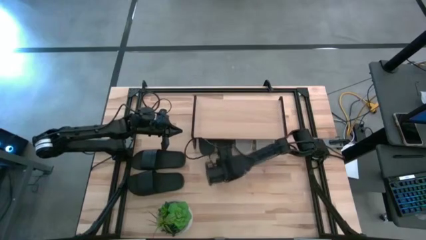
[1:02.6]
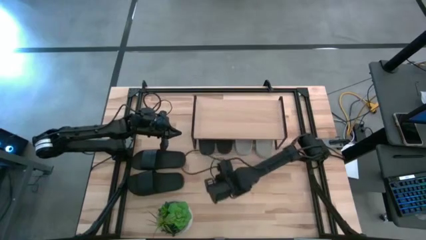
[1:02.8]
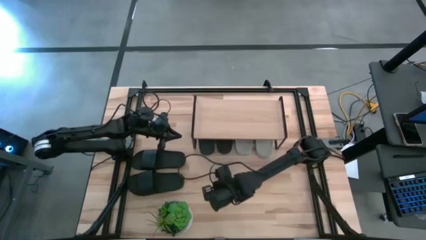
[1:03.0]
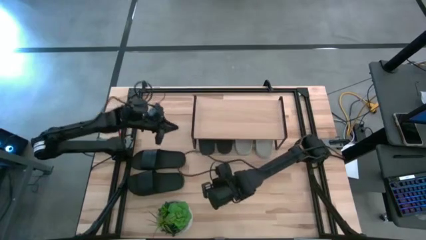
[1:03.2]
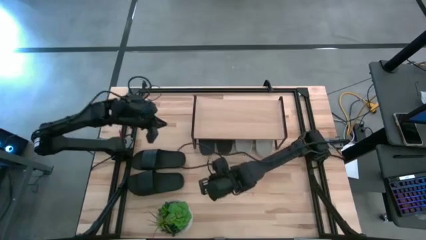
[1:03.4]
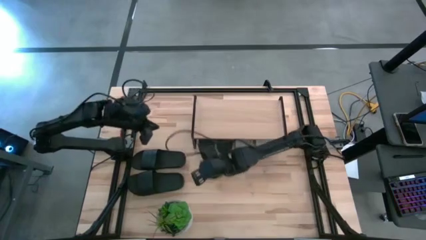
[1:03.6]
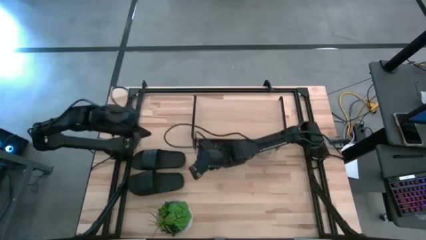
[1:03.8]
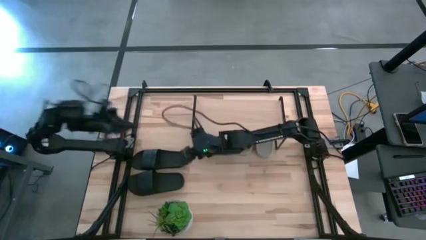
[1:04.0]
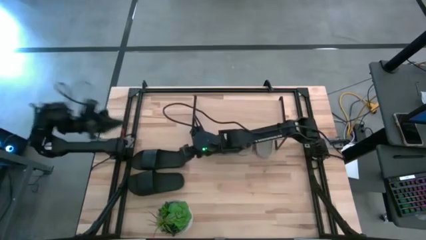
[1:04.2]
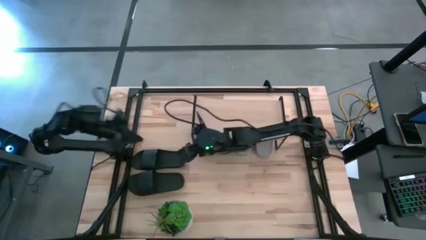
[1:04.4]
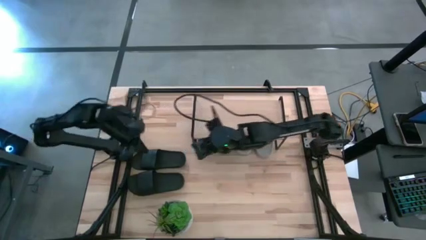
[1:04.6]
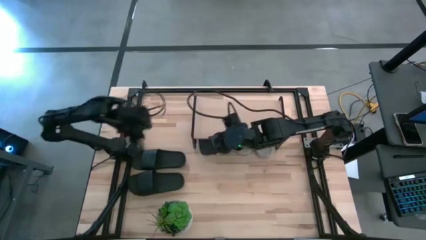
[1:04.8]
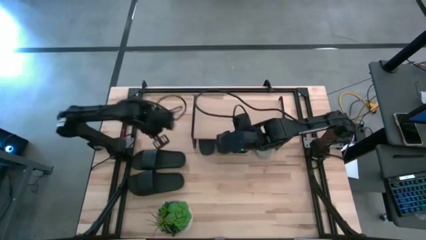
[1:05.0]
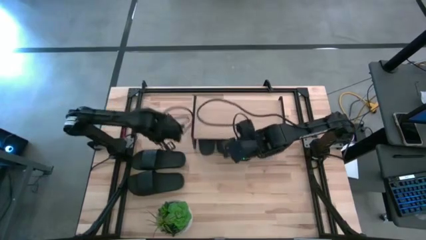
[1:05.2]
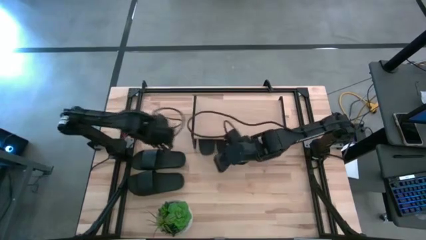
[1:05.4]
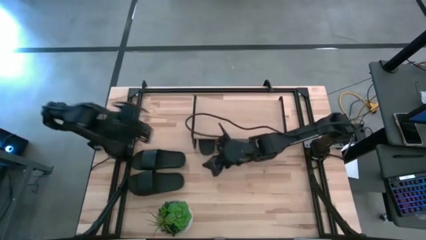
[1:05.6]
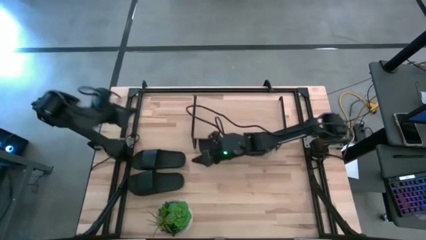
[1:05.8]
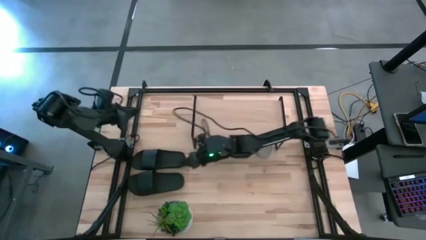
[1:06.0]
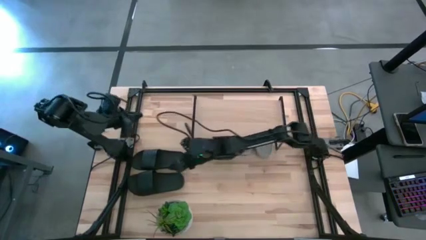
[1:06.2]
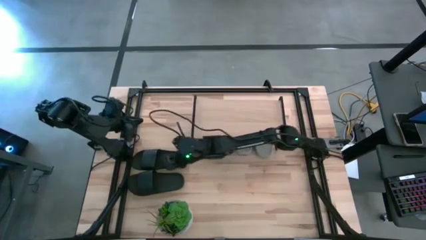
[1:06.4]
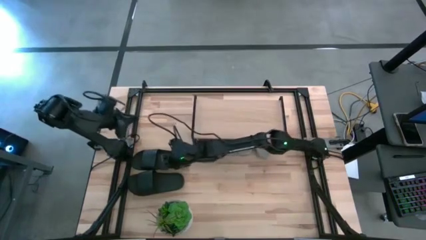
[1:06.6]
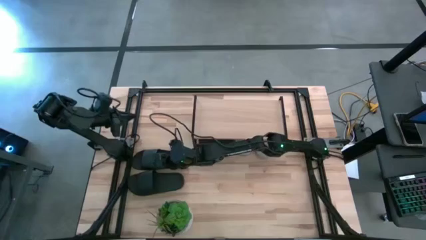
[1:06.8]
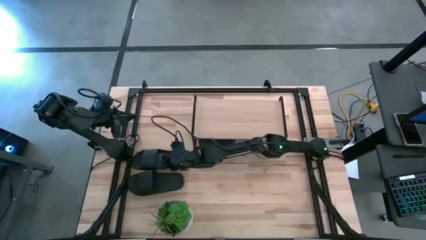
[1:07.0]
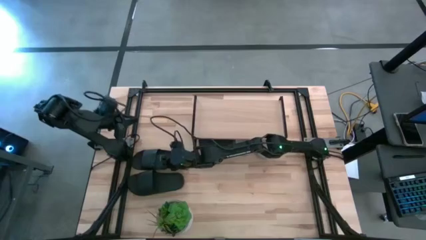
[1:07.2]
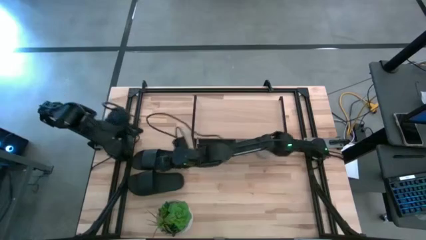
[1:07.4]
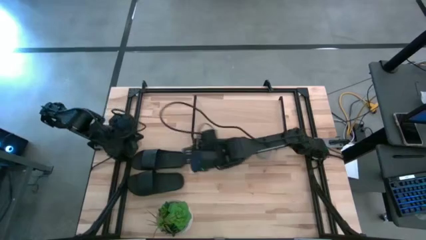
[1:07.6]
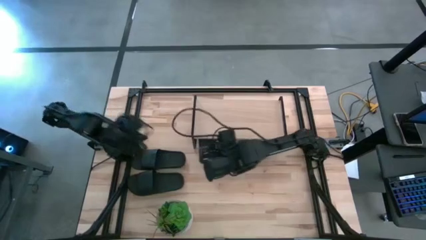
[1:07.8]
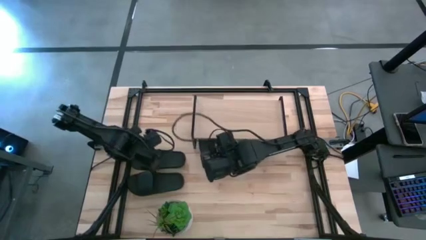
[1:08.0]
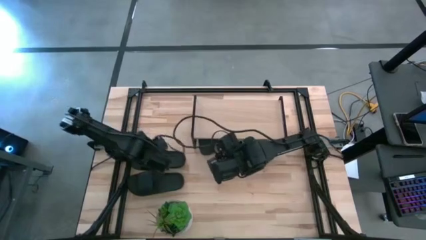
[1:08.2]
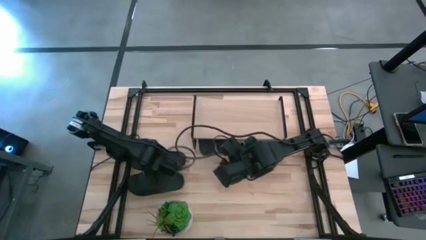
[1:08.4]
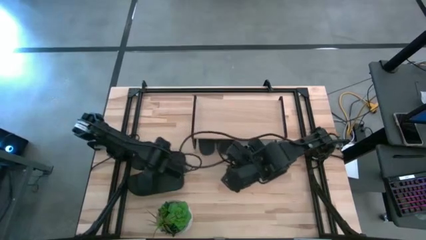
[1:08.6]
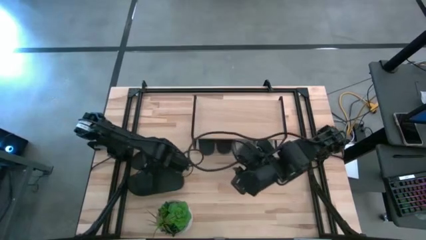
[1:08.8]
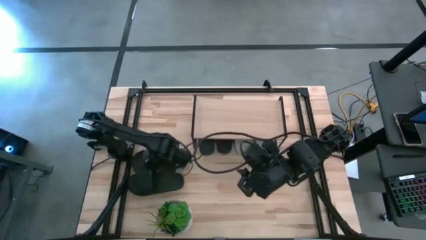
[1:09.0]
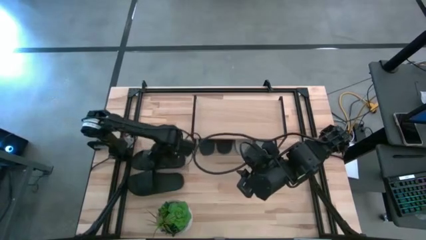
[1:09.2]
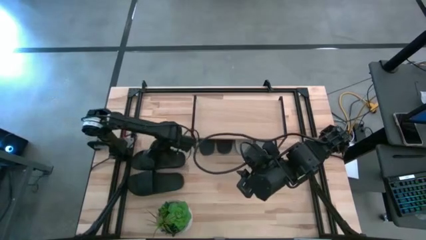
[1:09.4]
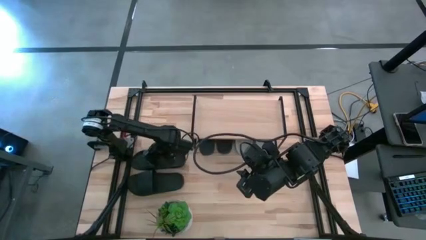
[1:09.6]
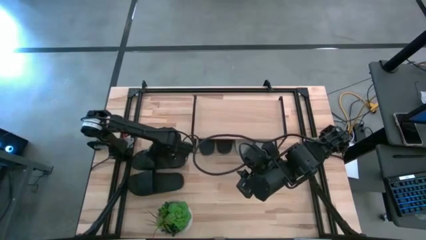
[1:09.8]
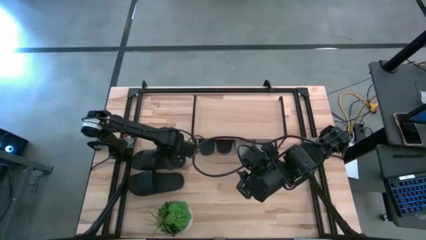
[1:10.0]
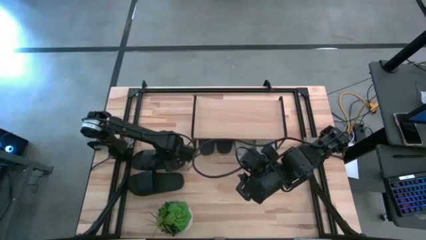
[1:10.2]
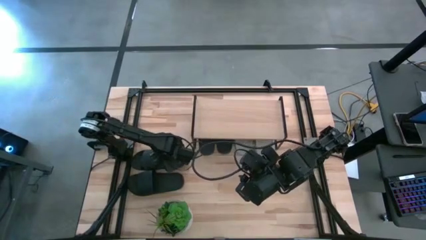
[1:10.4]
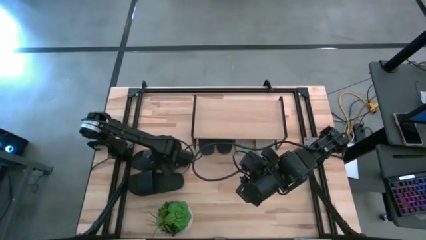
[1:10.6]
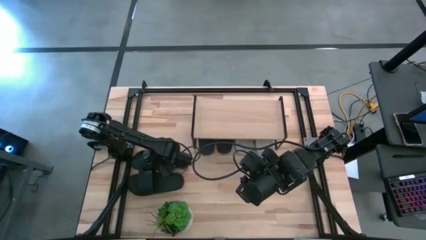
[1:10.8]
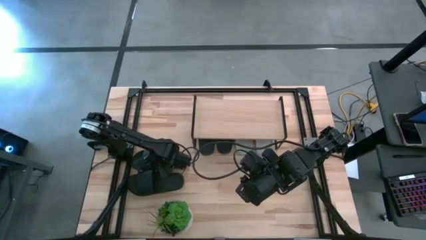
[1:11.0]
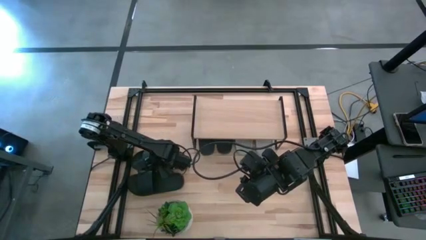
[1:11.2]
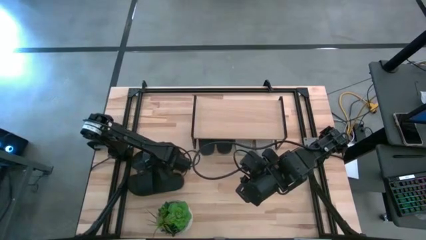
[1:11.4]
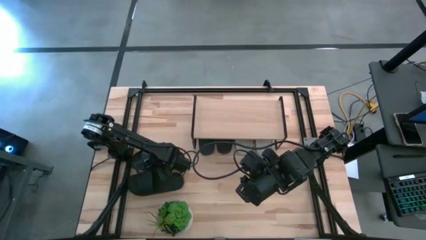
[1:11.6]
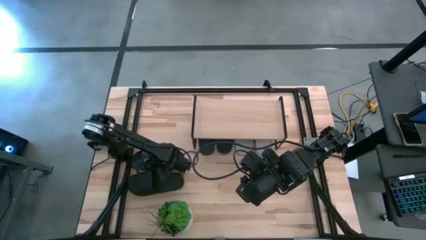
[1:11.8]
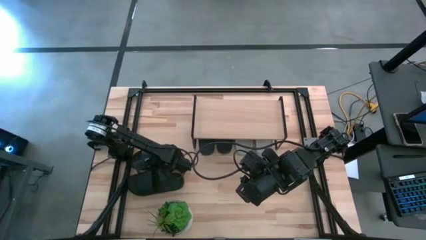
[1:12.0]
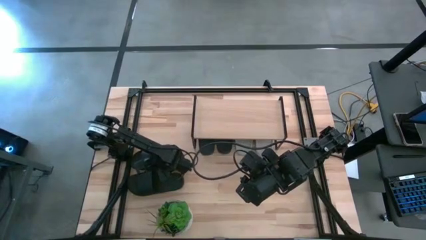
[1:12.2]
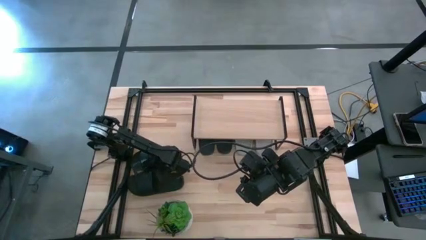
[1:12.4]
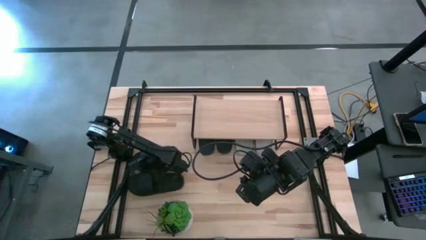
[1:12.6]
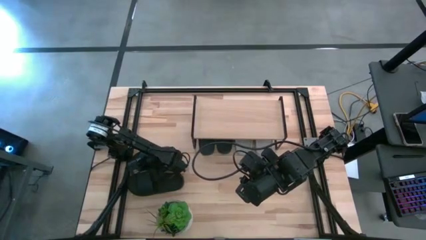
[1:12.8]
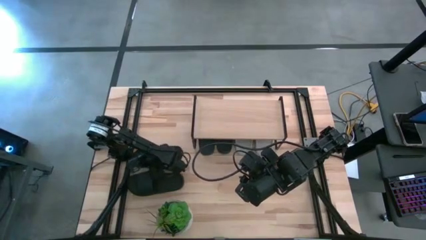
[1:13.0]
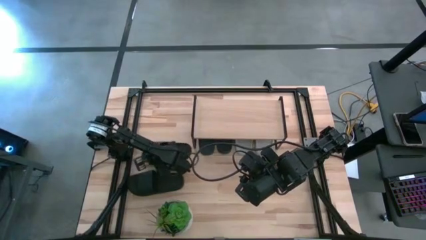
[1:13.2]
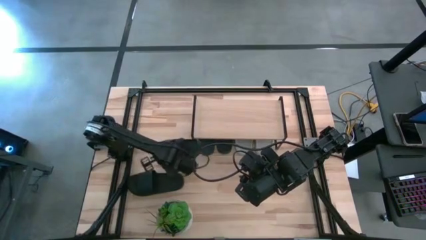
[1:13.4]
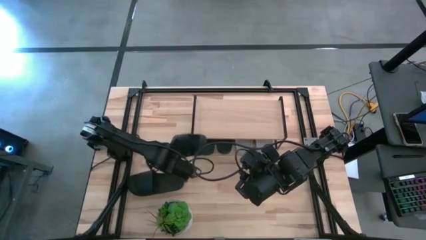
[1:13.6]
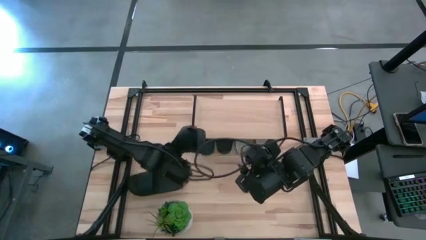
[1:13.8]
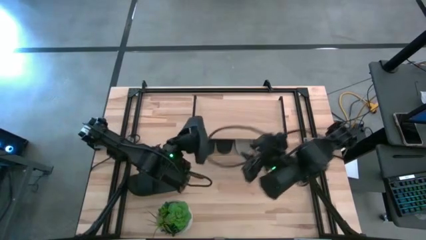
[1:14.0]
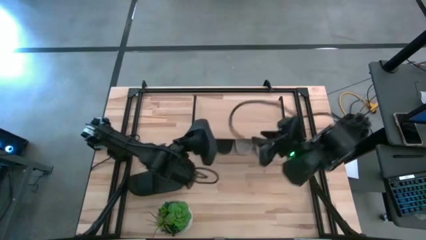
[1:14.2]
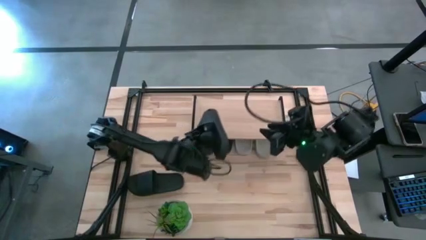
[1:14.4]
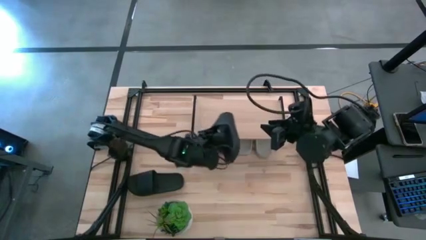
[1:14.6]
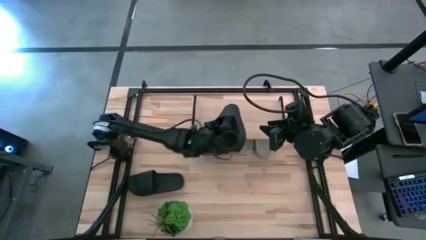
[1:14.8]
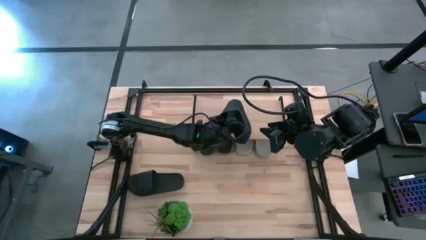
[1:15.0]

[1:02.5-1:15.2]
Task: Pick and place slides into the shelf
Put the black slipper on the shelf

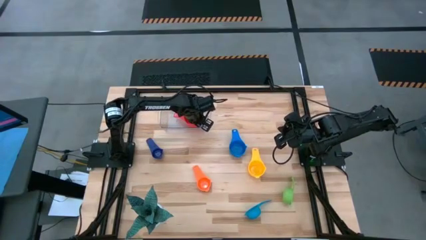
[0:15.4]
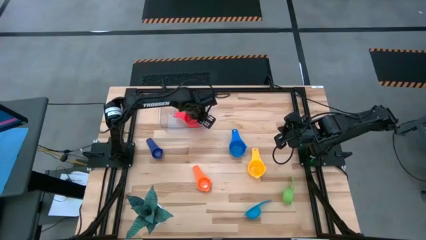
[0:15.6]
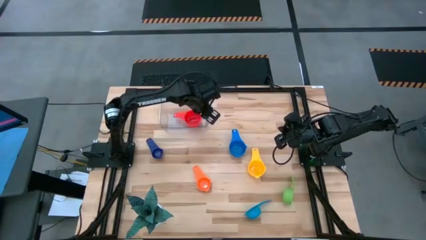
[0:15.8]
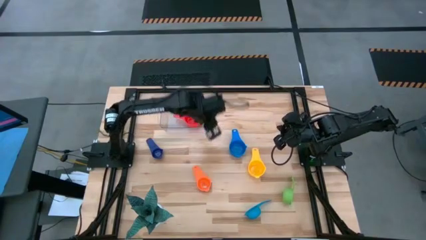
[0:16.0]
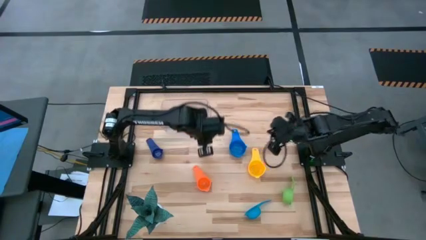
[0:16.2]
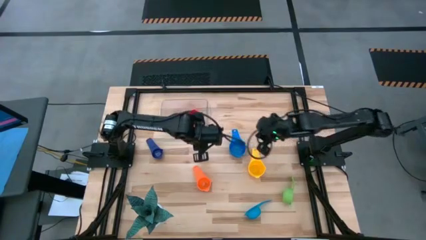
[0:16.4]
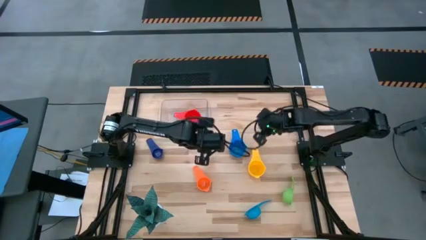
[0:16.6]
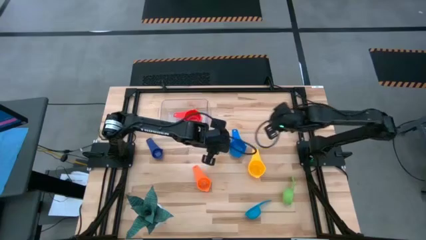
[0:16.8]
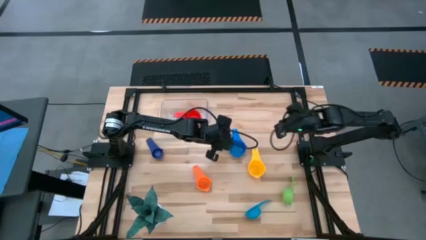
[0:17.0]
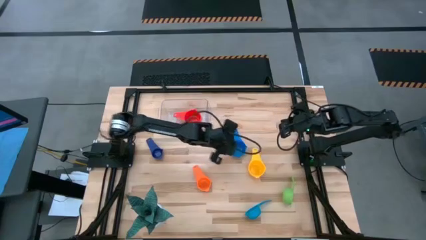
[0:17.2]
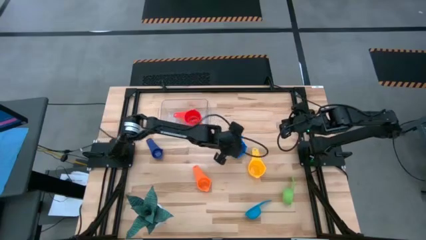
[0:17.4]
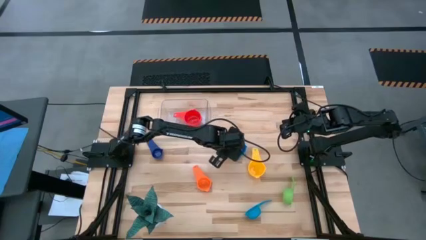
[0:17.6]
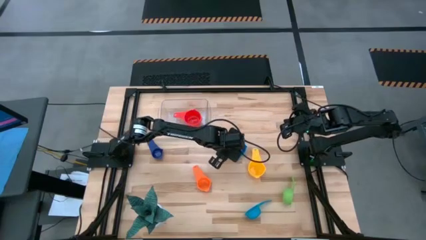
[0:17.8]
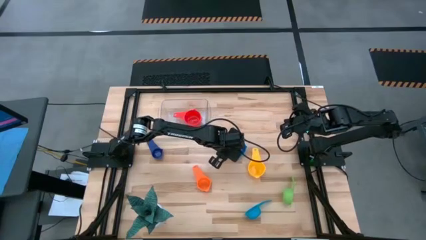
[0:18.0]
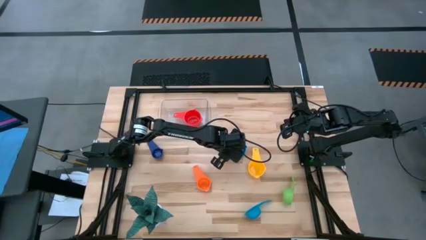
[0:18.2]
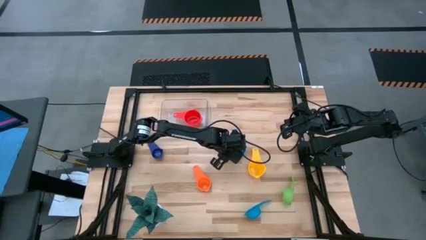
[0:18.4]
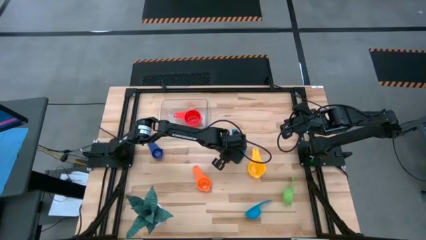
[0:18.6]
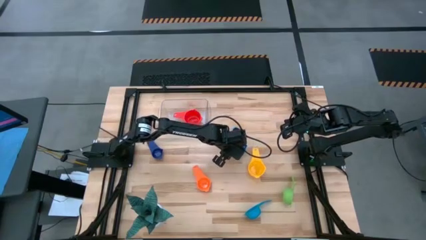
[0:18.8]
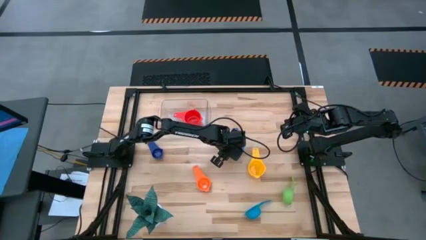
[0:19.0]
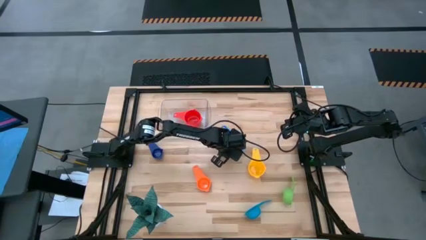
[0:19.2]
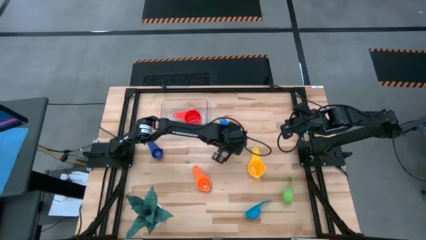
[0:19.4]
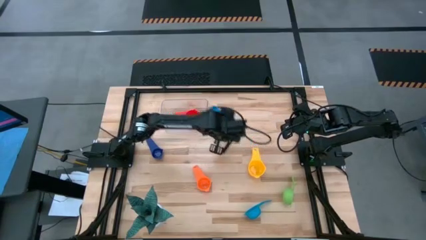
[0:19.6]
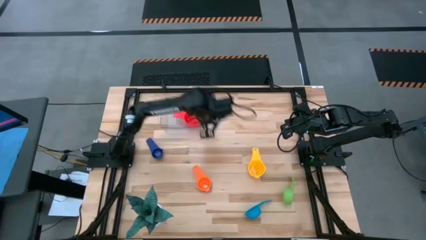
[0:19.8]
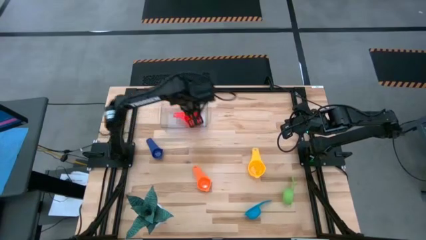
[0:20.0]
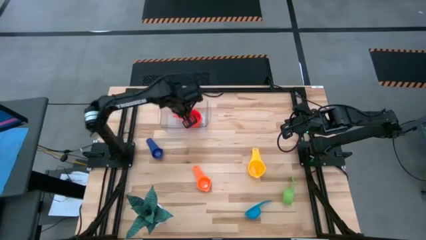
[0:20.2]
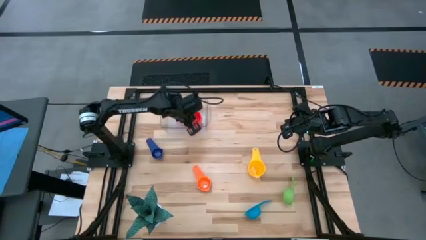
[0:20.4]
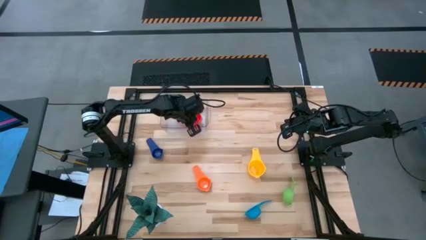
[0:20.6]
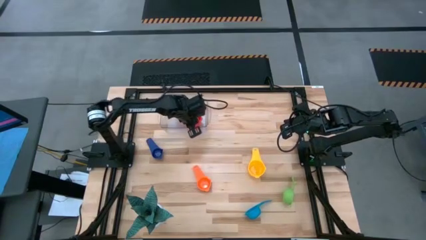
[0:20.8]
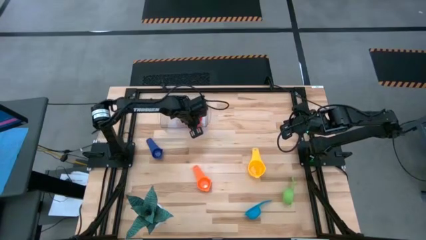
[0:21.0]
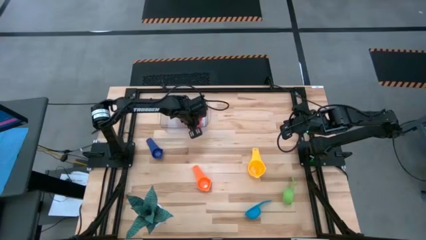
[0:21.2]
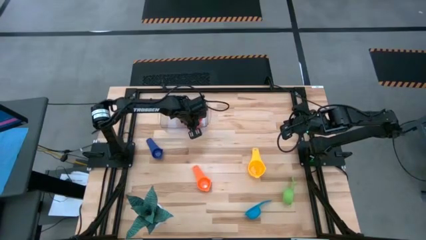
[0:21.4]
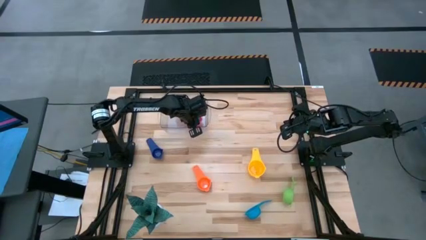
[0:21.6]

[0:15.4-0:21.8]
Task: Nest measuring cups in basket
Stack the blue measuring cup on top of the orange cup into the transparent bin
